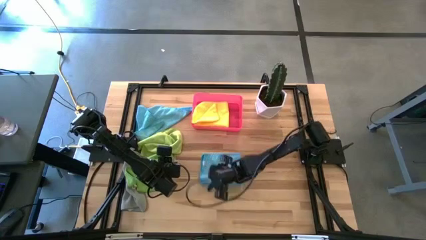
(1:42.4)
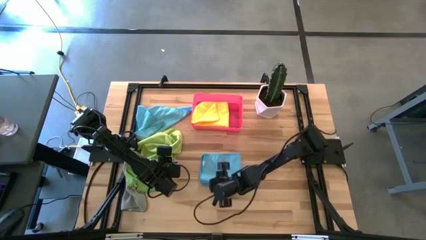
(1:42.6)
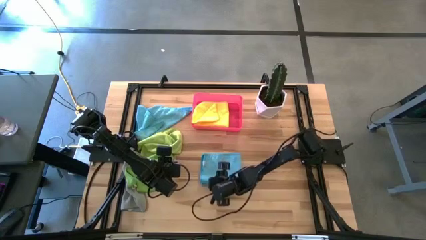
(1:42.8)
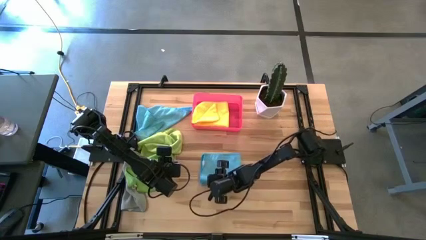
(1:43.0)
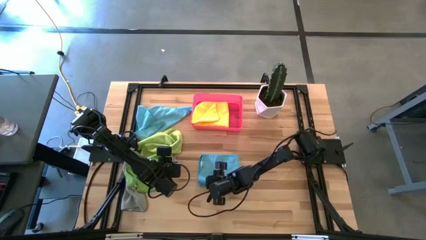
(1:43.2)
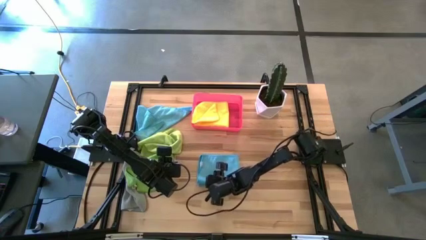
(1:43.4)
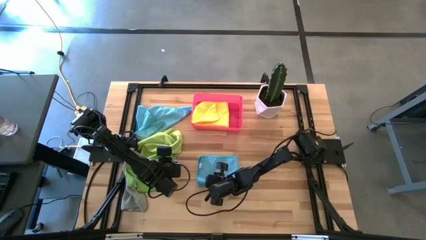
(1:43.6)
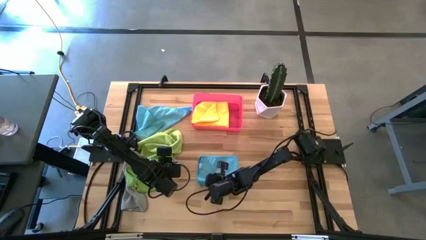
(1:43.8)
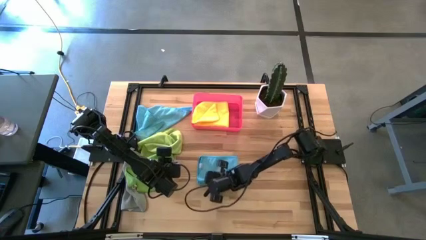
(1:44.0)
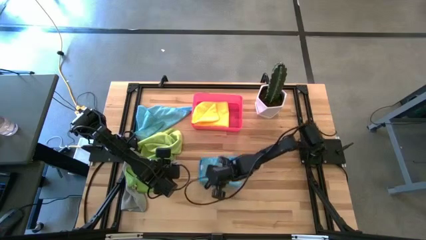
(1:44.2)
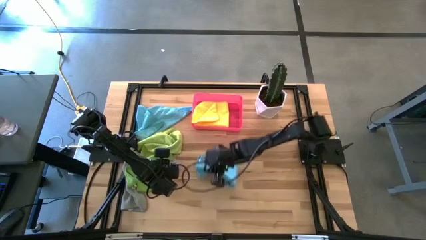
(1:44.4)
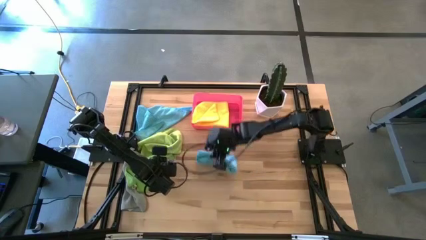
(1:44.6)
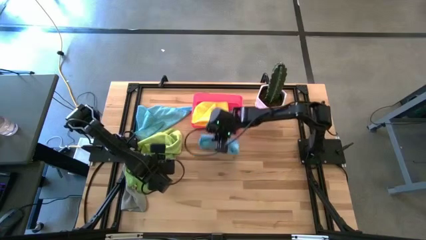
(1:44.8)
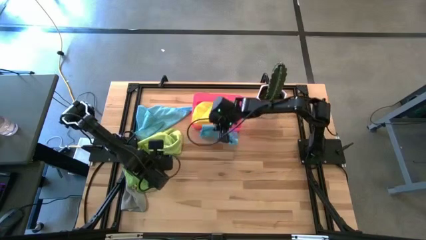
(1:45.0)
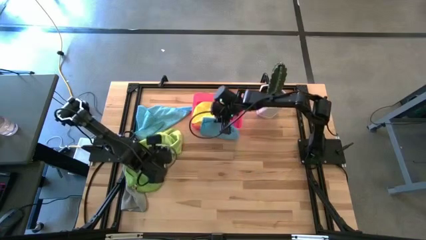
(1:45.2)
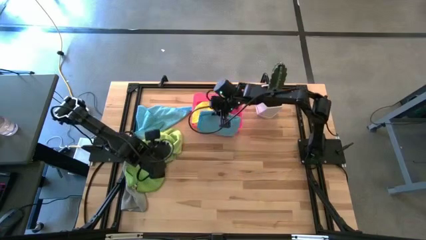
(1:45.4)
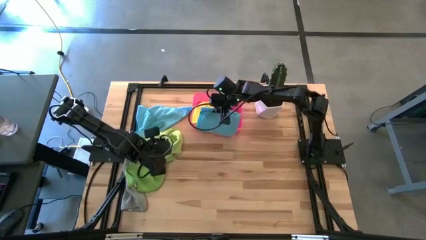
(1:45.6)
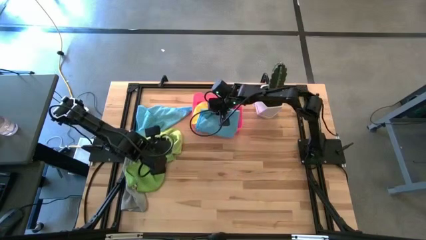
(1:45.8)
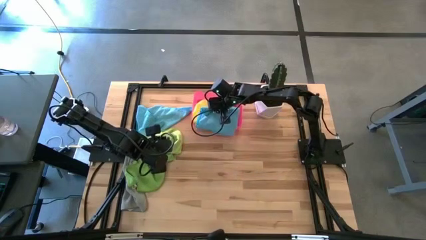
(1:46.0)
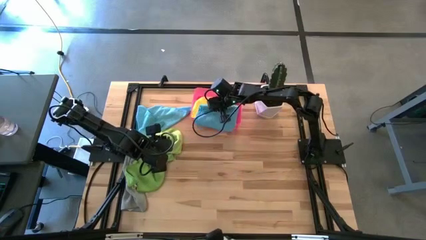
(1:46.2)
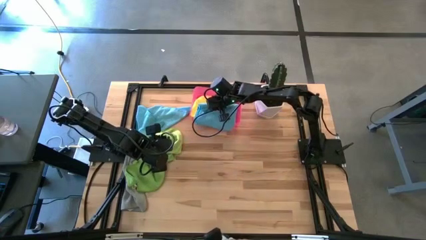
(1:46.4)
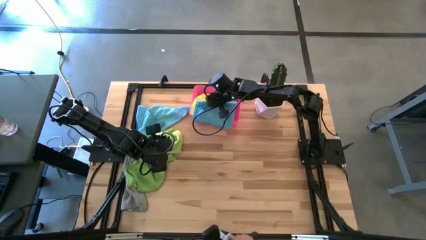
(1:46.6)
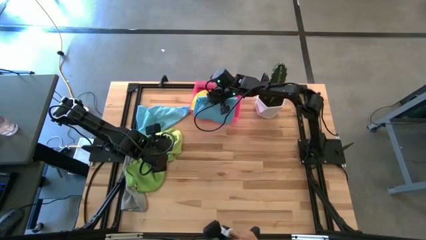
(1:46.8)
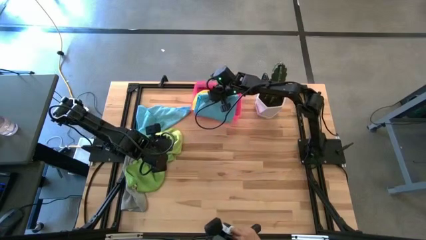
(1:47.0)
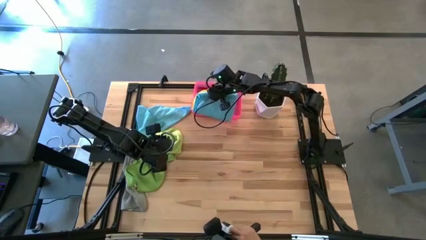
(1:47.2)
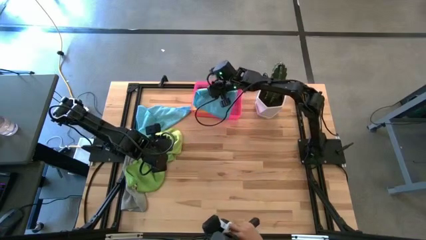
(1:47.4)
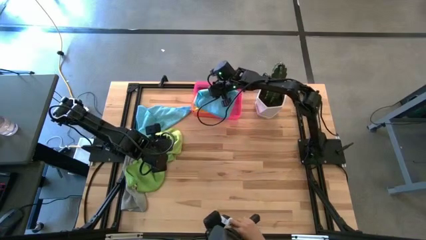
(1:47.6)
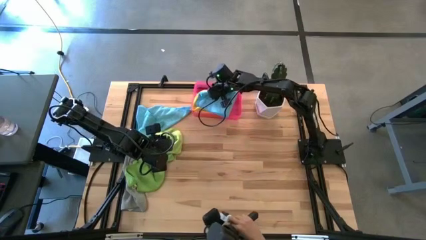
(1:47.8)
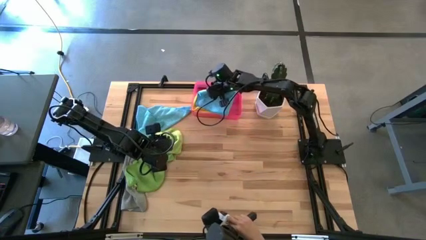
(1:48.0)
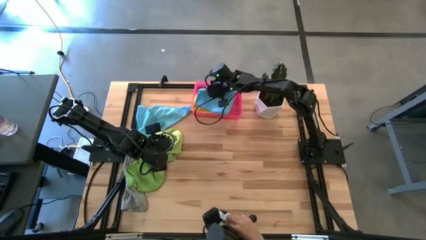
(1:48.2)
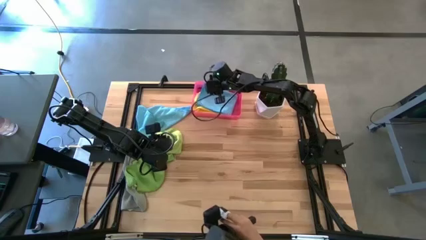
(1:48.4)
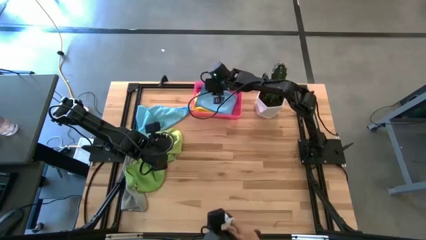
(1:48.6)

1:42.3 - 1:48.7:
Task: Fold microfiber towels
Put the light blue microfiber cloth into the pink bin

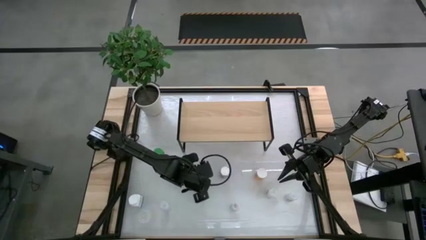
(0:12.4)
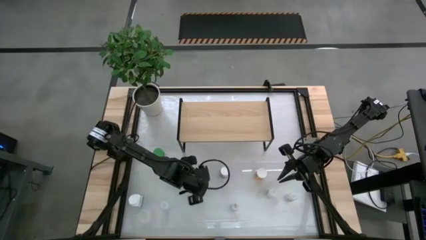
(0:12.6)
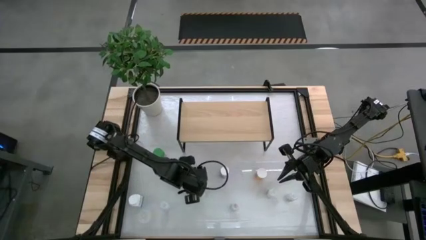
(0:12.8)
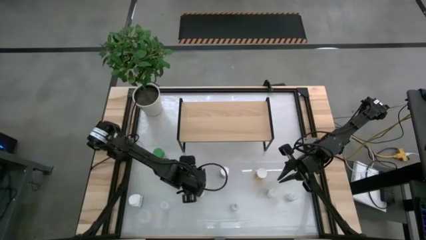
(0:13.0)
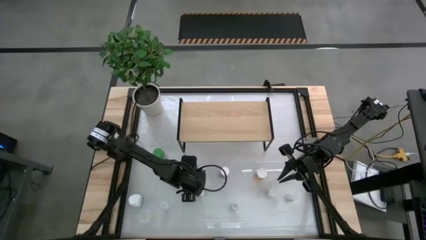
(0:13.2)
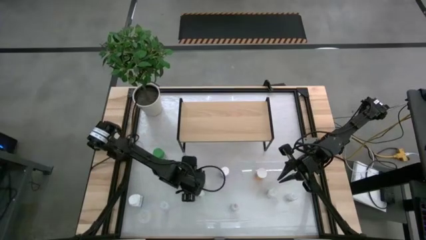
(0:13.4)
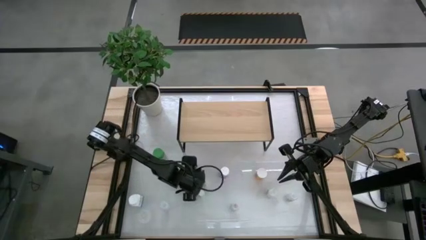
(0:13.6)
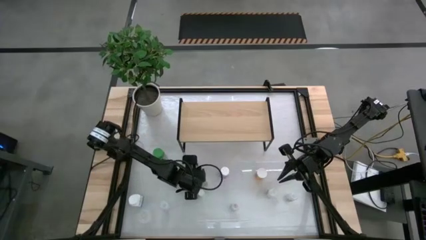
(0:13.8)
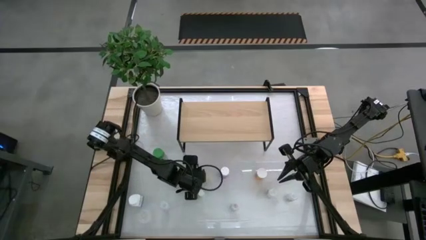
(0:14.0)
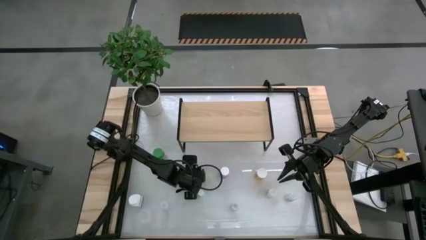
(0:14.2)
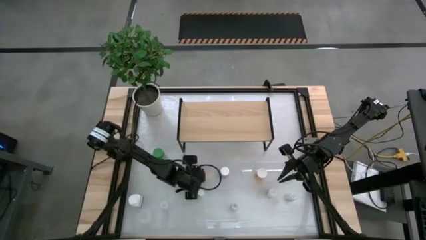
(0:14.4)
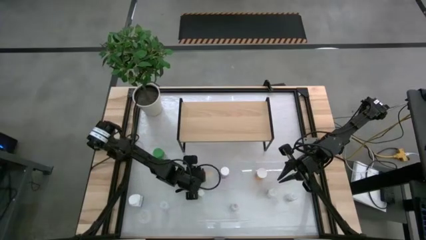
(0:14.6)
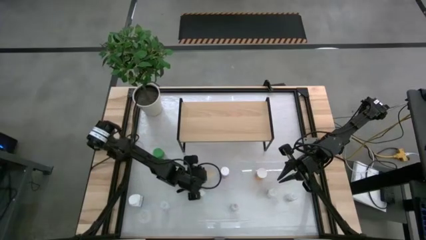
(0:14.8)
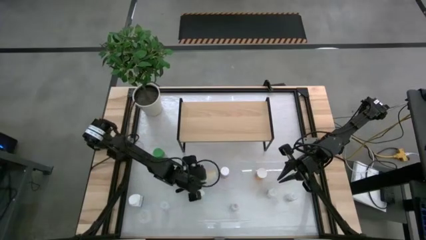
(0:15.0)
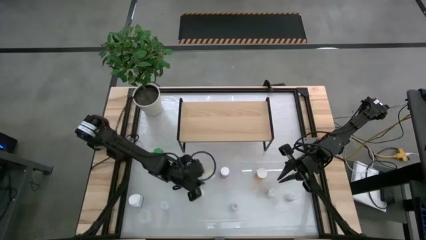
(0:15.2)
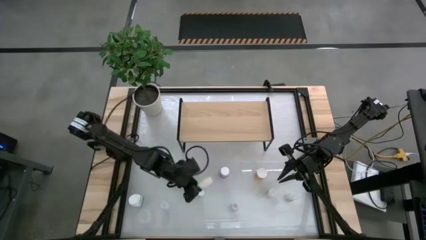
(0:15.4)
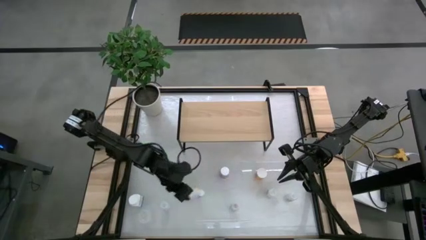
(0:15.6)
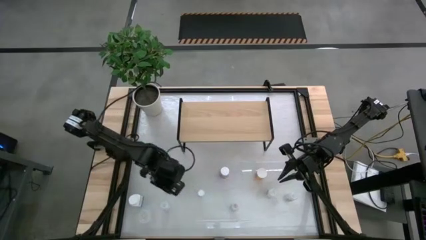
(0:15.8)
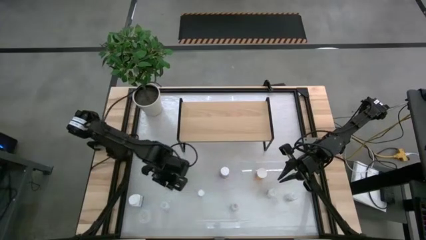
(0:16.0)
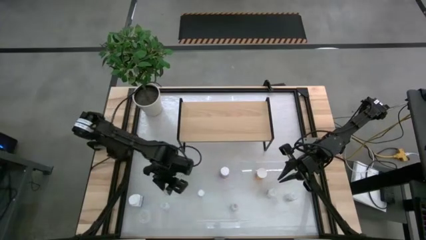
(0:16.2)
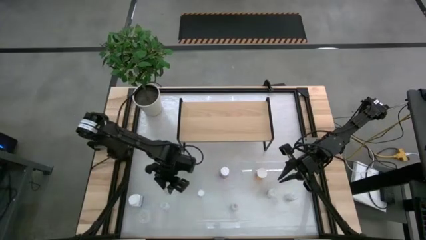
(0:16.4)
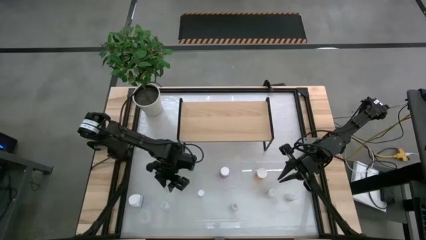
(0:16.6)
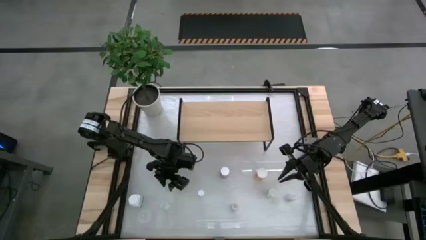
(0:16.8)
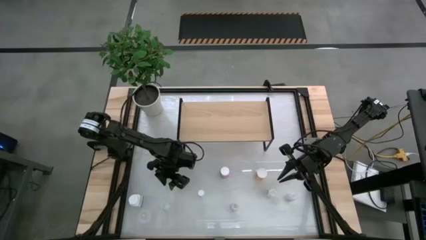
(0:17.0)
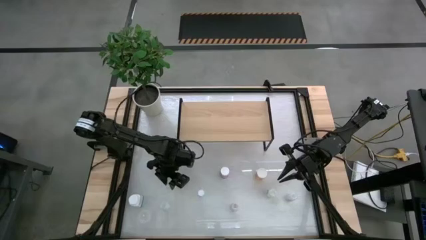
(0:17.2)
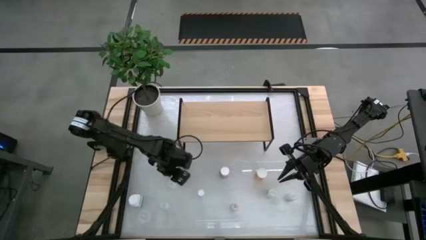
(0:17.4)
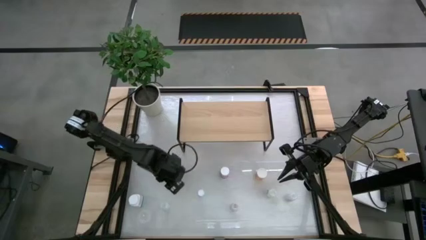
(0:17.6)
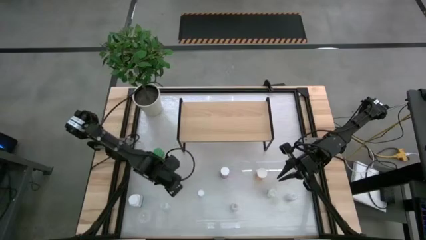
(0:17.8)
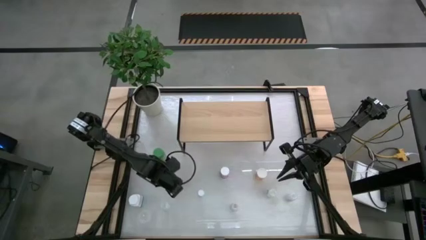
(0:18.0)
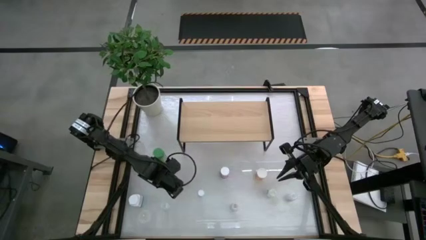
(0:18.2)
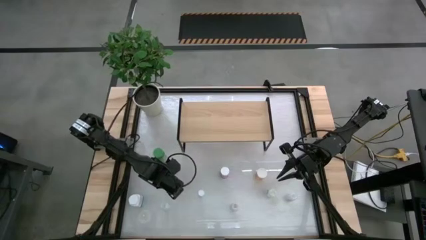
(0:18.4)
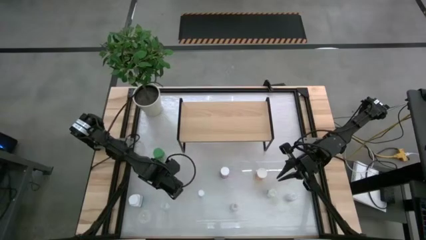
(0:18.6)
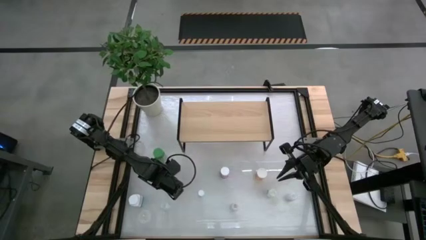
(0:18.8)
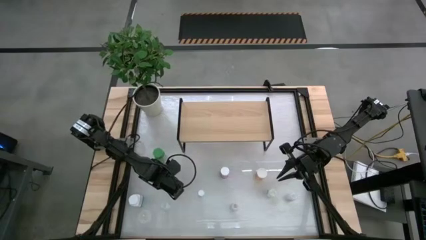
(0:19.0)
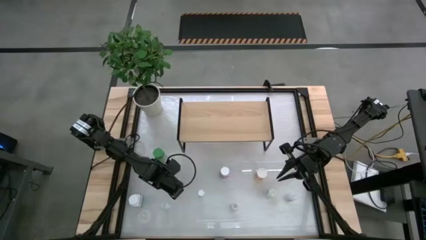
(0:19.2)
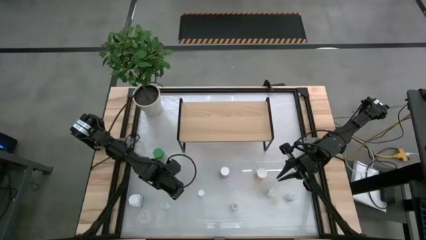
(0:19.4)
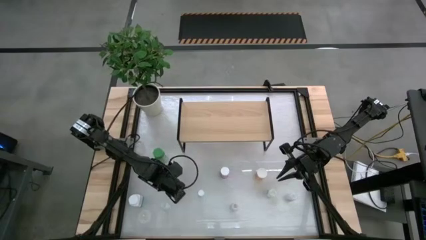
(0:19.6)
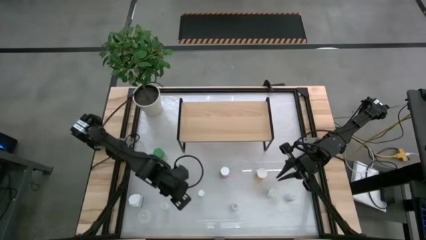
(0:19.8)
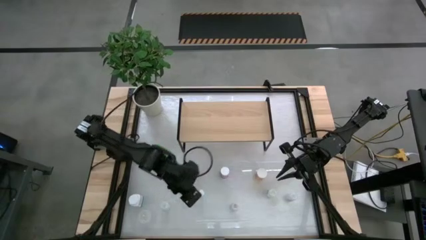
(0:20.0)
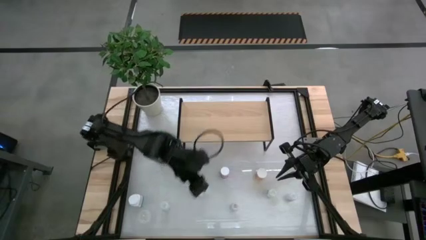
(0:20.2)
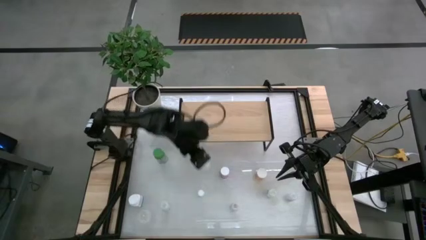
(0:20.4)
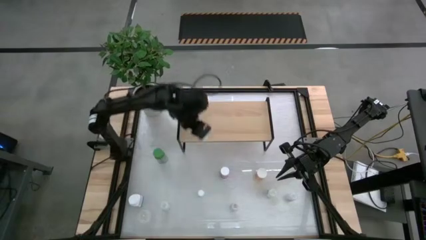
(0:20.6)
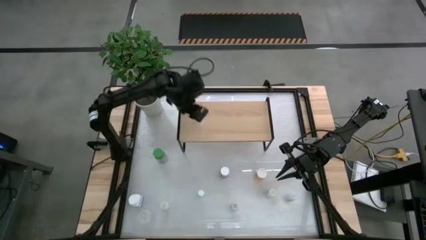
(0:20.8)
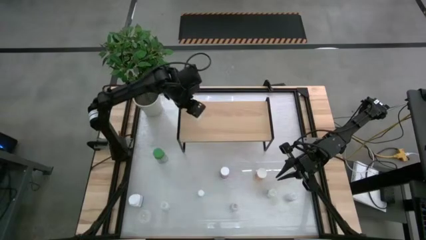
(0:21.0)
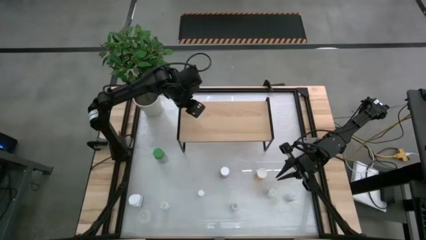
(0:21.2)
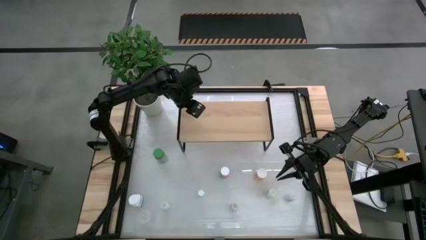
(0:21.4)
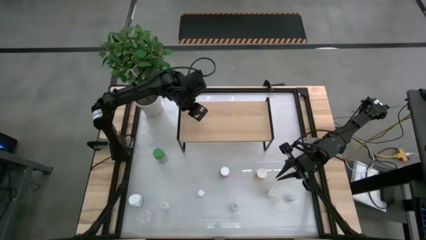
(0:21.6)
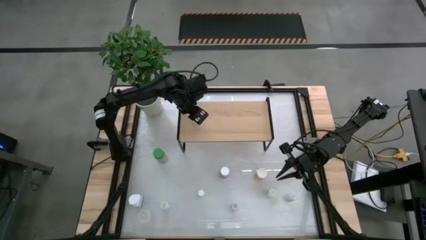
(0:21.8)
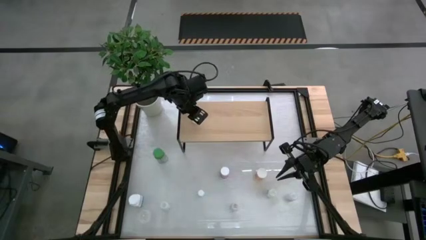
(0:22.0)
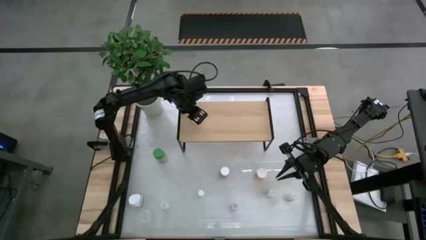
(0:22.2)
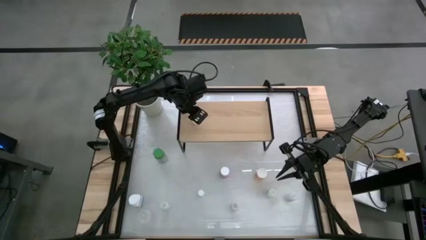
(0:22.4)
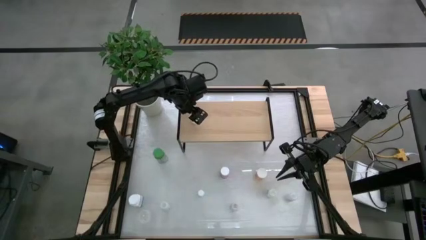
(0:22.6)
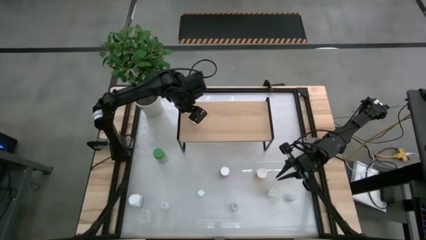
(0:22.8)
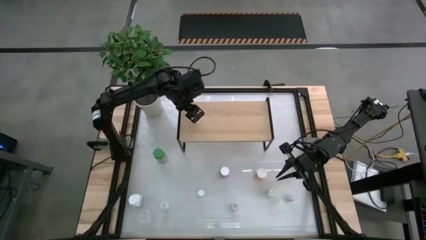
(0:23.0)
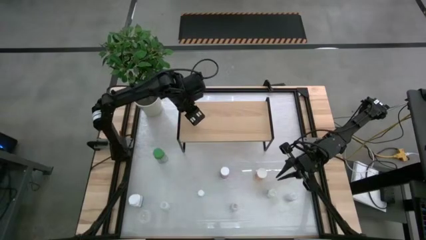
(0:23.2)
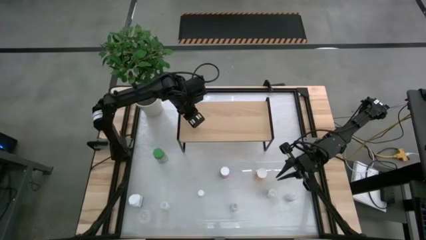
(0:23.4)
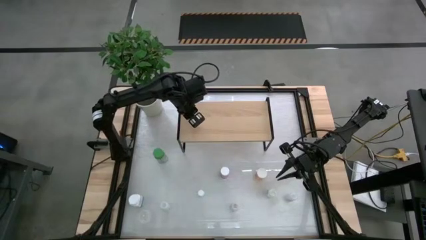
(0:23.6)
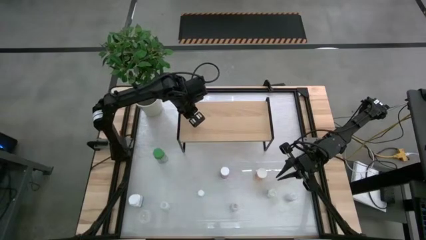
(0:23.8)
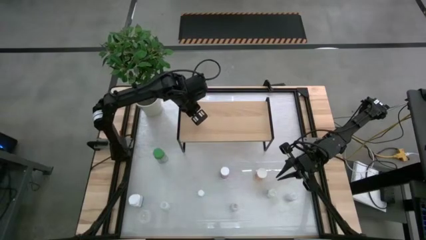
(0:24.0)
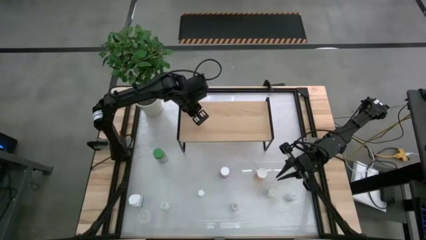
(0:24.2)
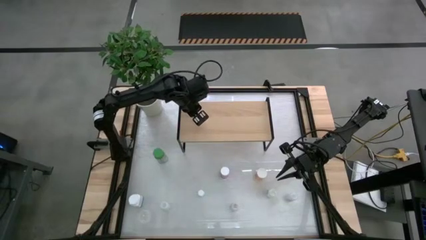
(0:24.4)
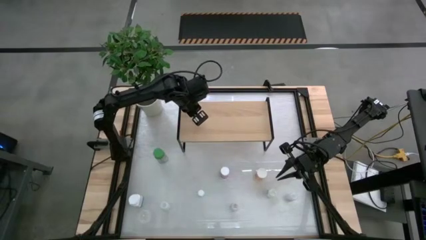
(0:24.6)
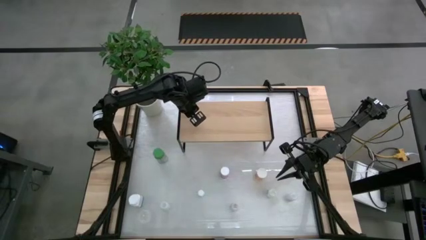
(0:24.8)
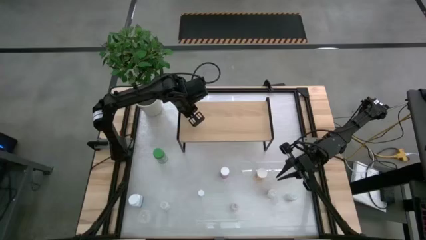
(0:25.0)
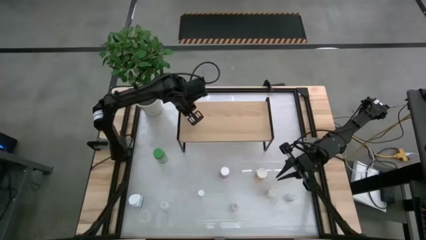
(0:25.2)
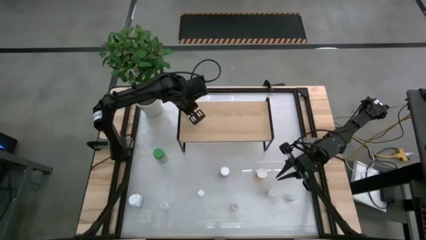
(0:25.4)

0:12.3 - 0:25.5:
Task: Pick and place medicine bottles onto shelf by color
Put the transparent pill bottle on the shelf
